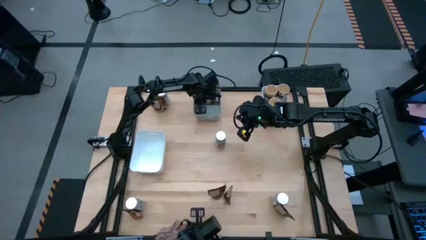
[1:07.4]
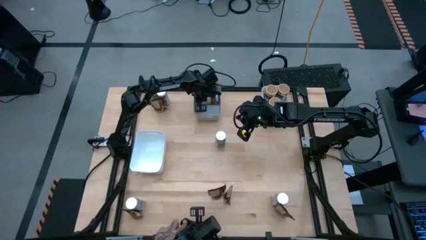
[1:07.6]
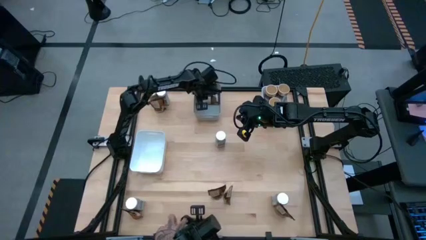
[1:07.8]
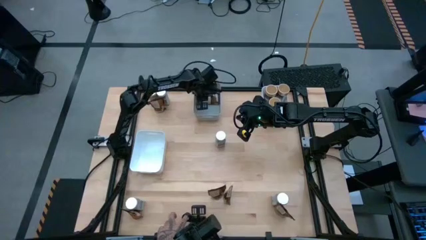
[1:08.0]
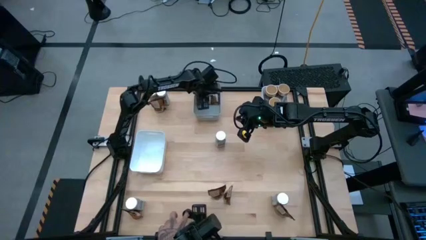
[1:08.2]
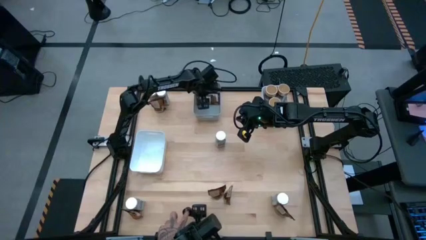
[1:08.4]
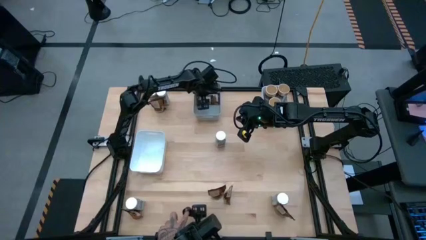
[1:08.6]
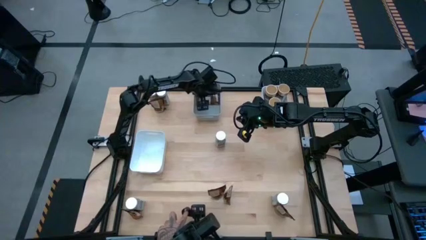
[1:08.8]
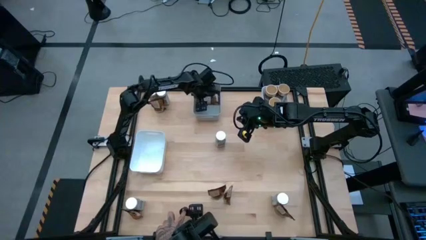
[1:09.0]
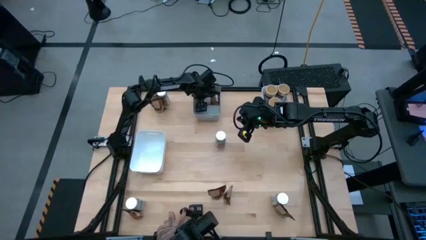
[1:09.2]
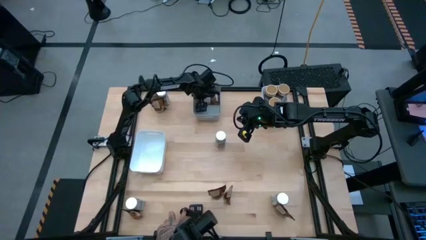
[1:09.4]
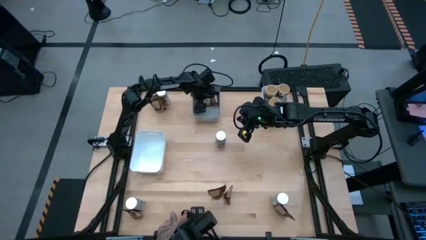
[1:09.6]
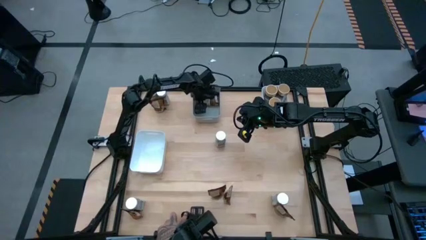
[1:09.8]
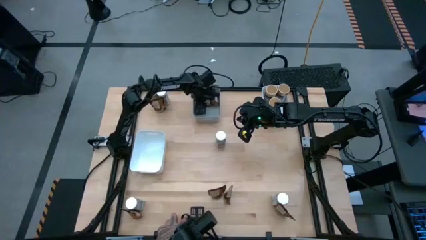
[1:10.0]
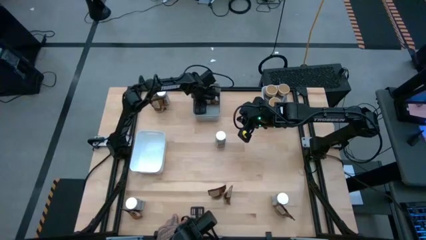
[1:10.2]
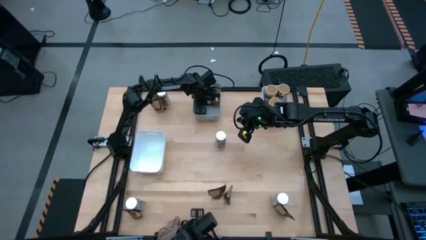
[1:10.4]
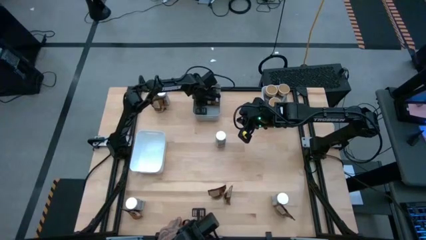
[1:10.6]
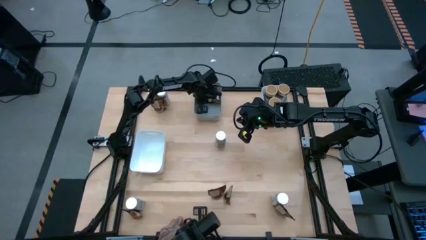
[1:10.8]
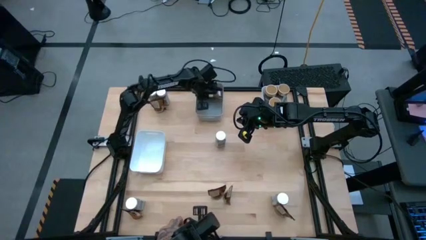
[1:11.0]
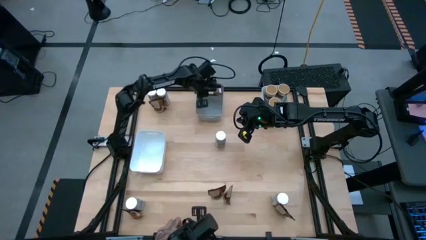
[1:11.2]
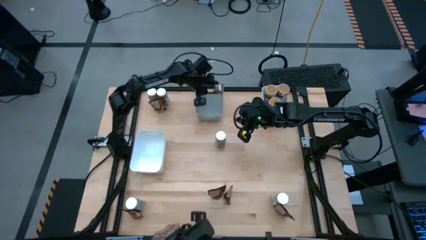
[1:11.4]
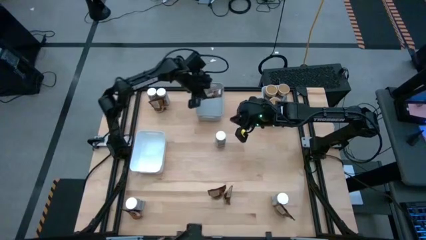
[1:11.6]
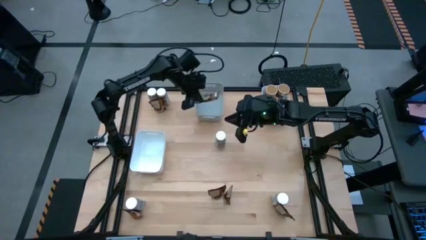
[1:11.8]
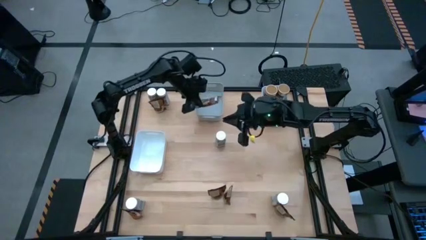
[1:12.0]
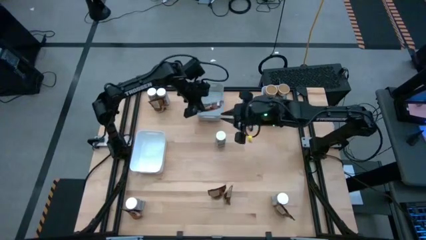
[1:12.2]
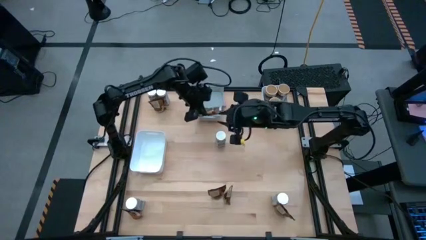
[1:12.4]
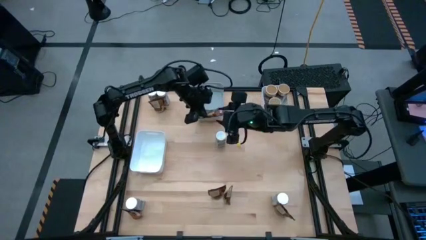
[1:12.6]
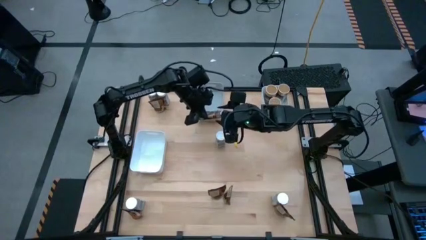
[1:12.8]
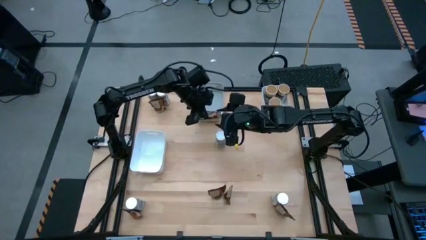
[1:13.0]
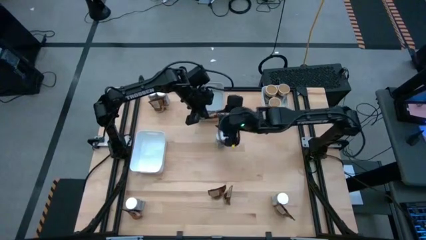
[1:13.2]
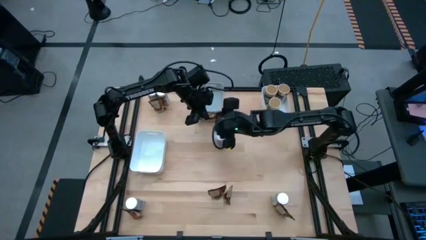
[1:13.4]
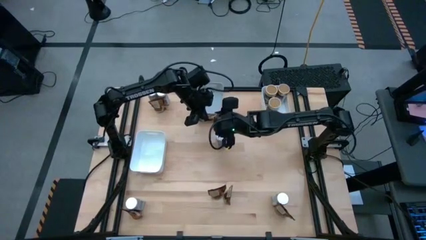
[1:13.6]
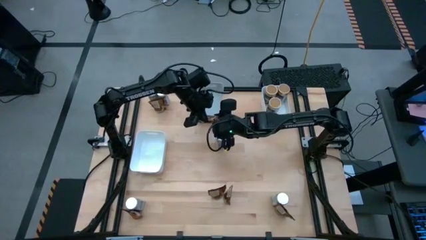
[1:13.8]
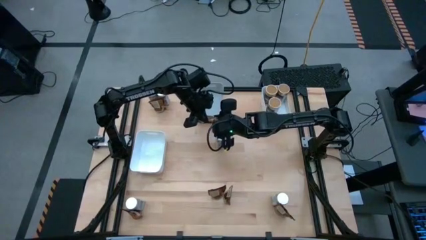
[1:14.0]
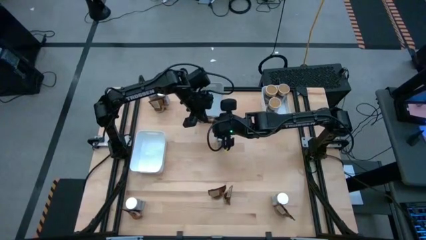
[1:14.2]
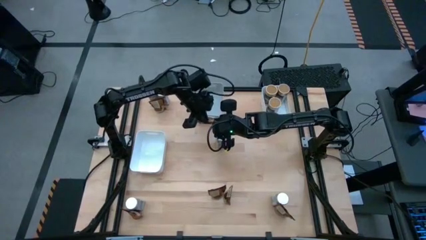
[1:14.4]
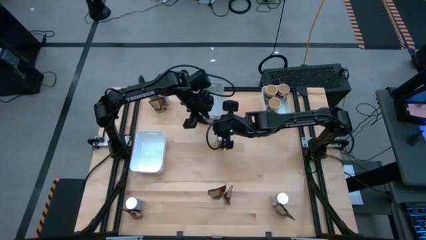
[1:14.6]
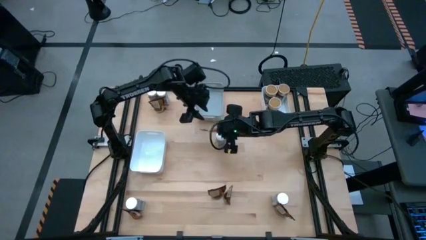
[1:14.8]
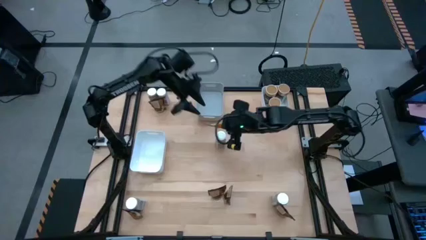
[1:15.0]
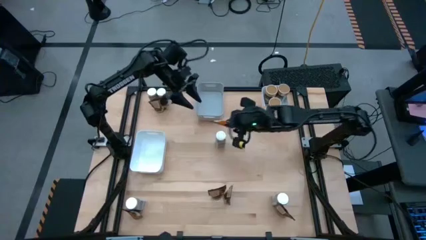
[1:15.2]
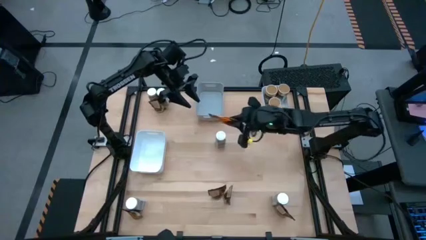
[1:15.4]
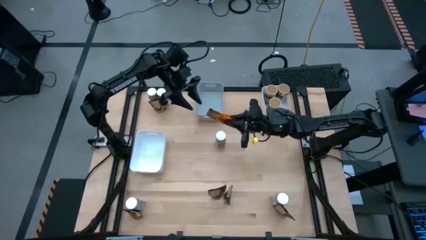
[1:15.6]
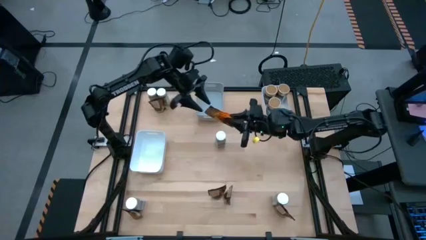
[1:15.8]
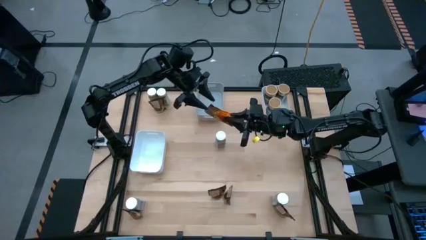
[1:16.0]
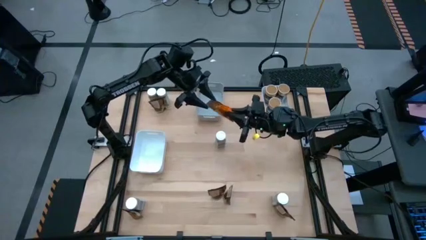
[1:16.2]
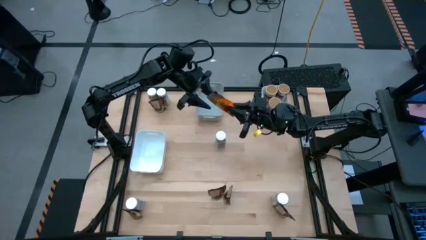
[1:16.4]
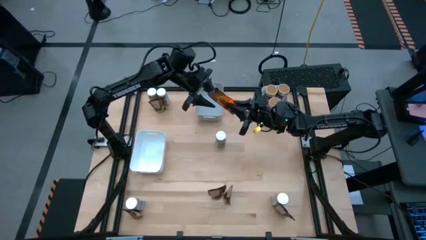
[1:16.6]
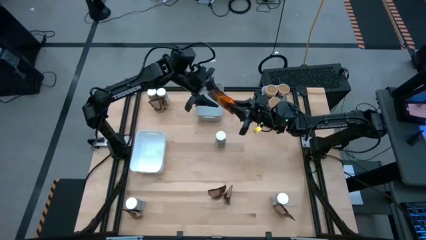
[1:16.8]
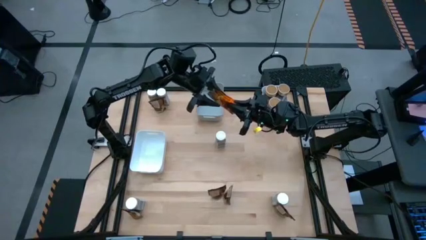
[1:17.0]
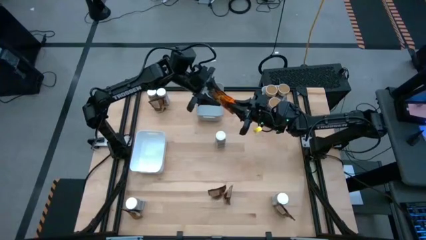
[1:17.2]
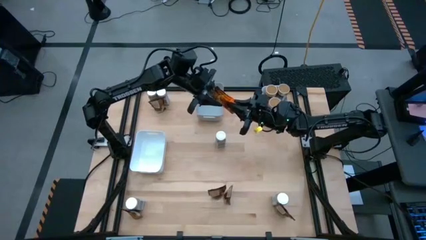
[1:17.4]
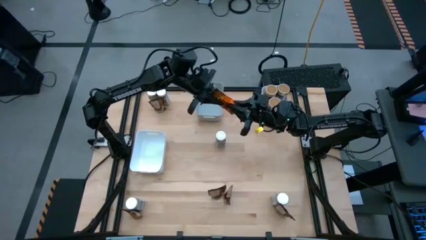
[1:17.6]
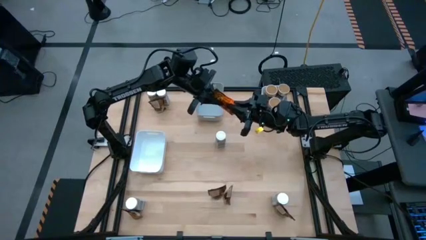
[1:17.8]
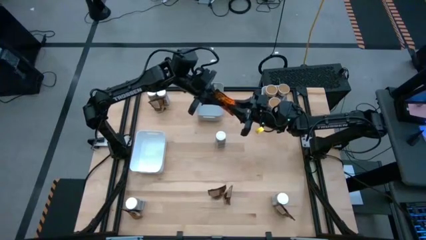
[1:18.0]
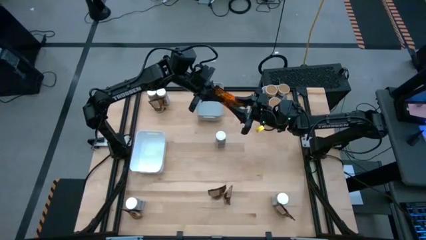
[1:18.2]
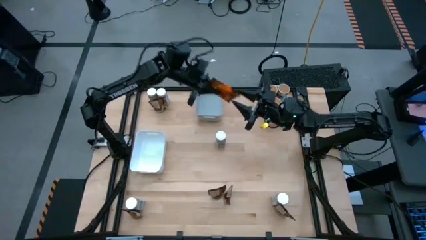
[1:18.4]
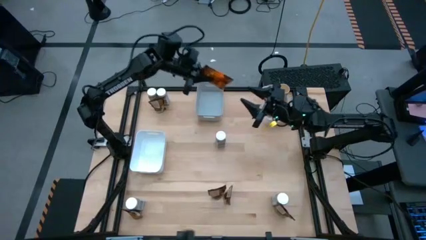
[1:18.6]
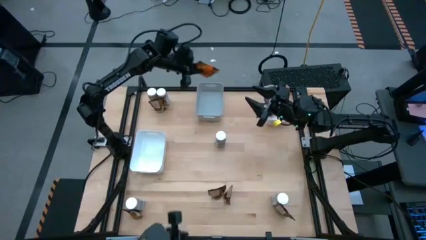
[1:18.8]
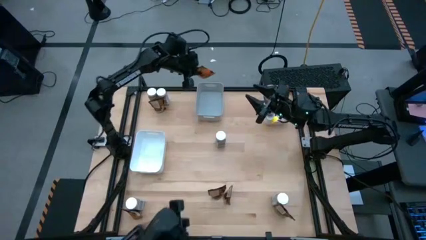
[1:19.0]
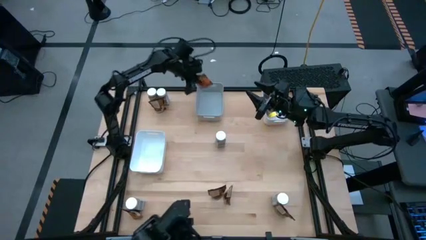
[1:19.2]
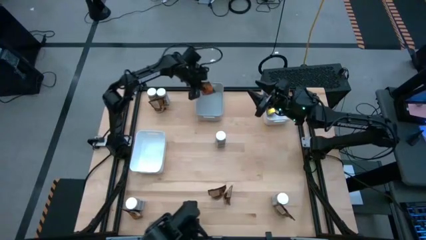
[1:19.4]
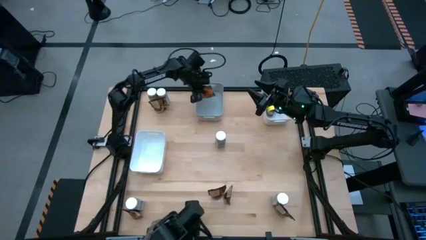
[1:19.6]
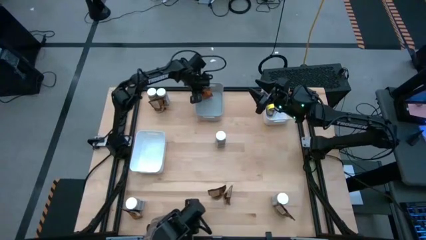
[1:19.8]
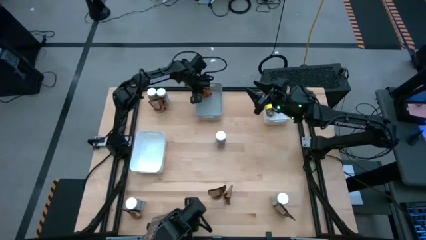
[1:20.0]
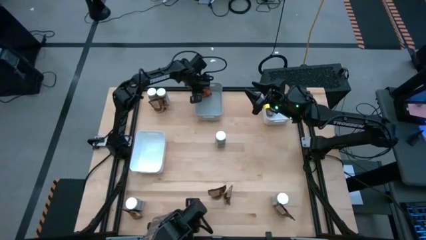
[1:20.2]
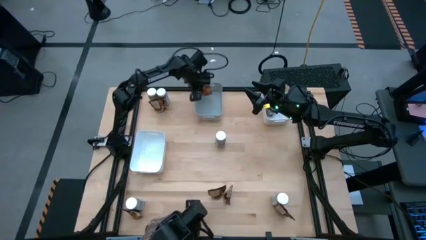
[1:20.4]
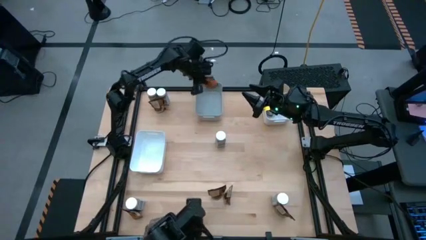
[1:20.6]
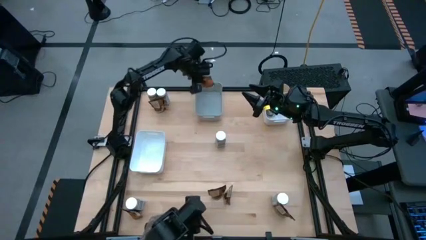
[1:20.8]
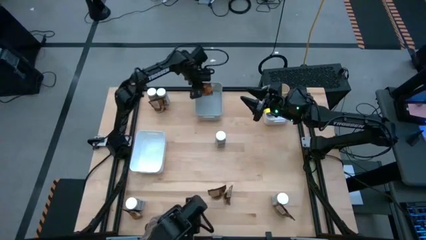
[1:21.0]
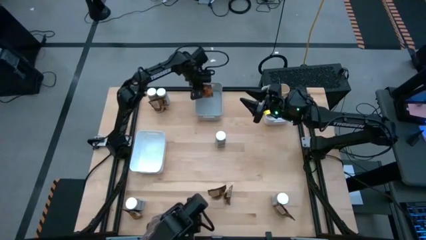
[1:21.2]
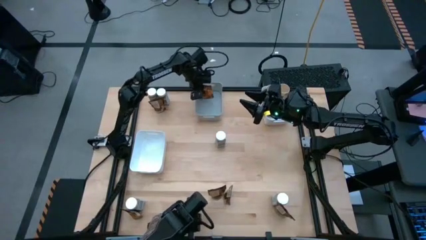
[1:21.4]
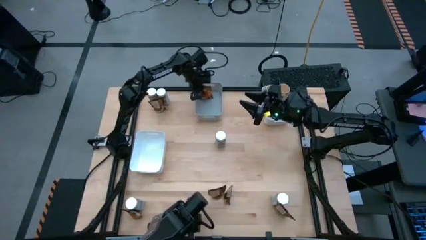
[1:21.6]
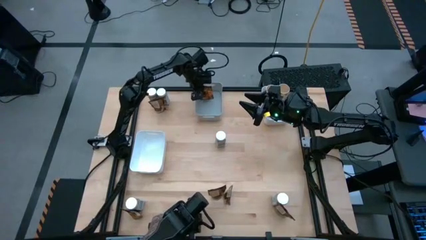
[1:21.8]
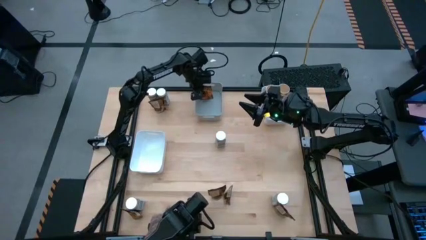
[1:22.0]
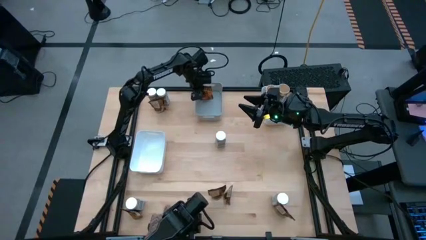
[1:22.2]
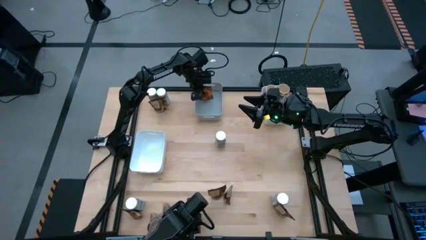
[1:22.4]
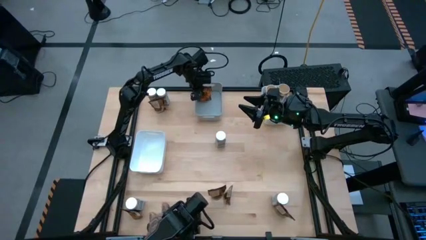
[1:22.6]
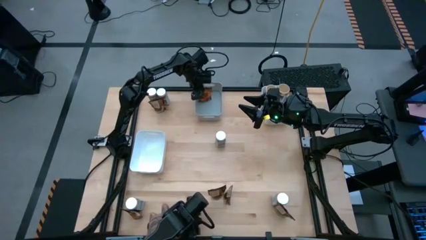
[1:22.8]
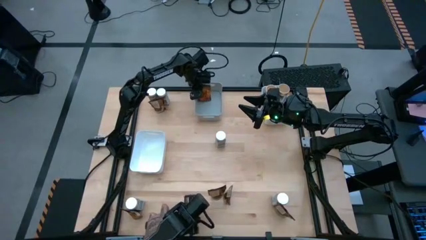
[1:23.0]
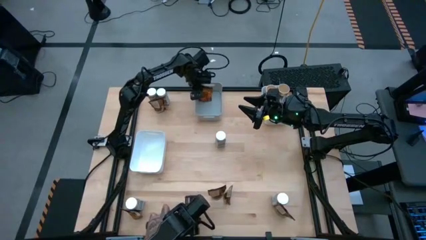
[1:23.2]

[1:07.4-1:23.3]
Task: Sort spices by type
Put the orange spice pack into the gray bin
